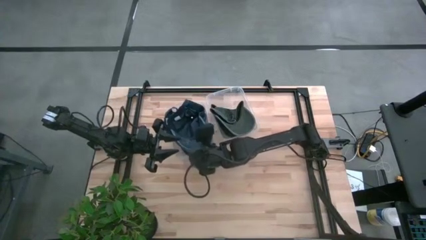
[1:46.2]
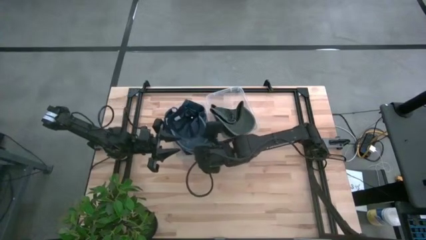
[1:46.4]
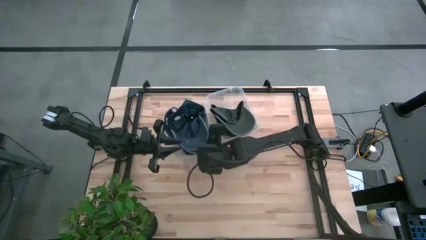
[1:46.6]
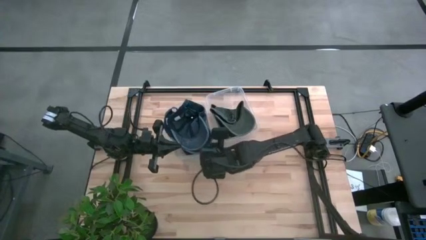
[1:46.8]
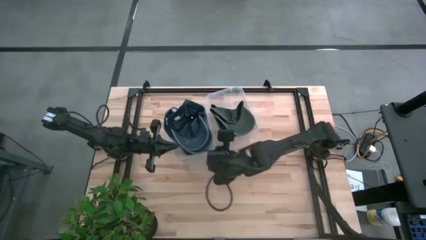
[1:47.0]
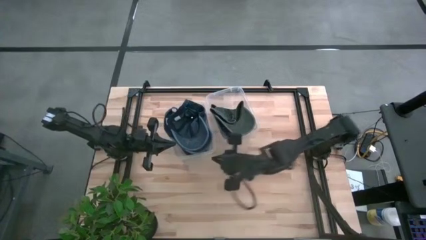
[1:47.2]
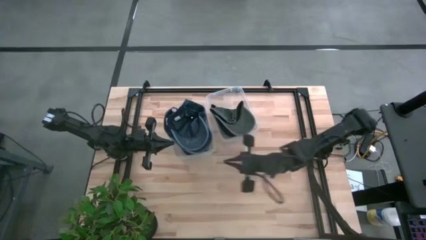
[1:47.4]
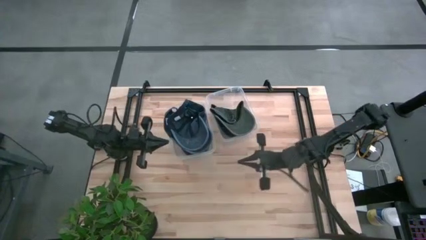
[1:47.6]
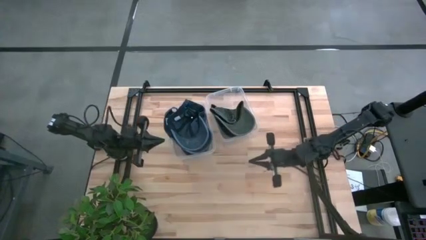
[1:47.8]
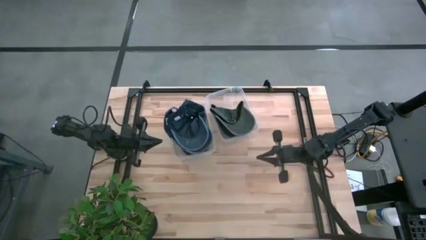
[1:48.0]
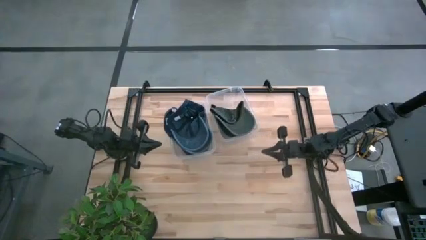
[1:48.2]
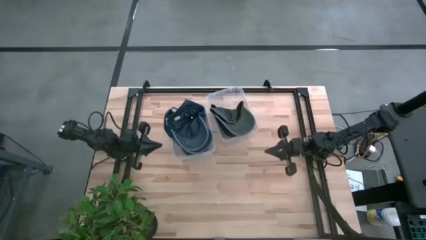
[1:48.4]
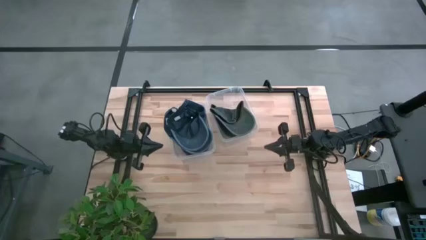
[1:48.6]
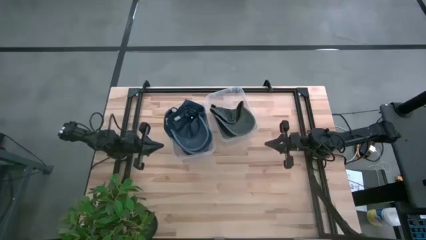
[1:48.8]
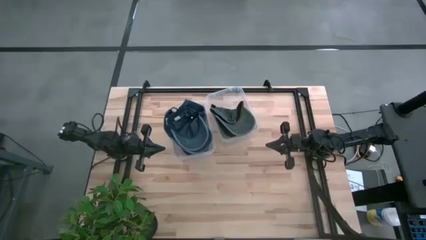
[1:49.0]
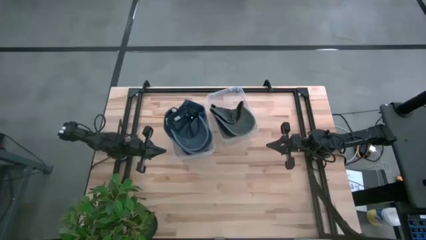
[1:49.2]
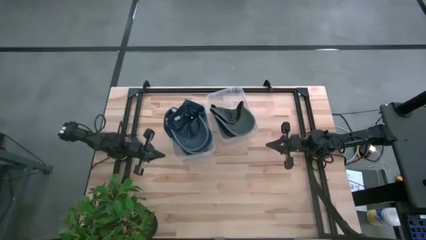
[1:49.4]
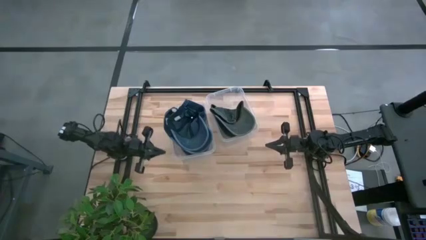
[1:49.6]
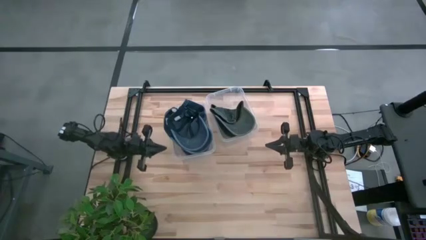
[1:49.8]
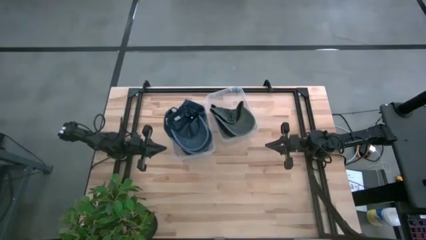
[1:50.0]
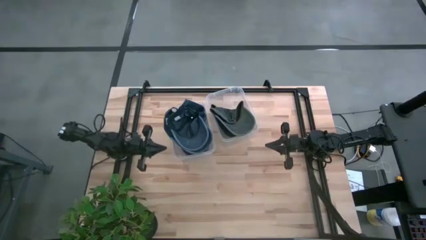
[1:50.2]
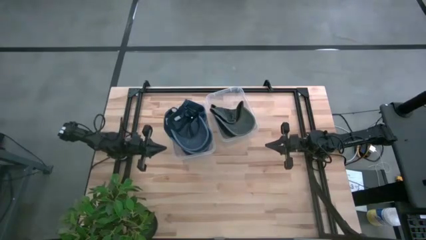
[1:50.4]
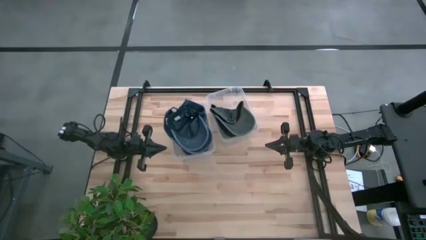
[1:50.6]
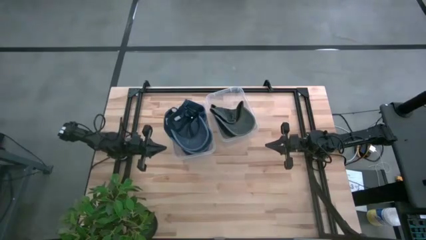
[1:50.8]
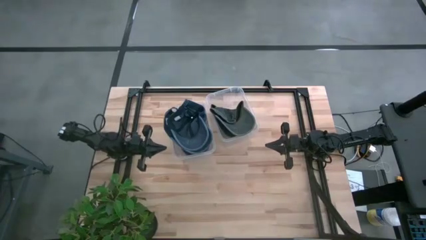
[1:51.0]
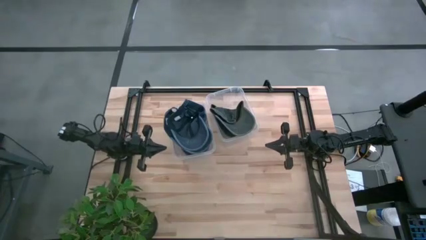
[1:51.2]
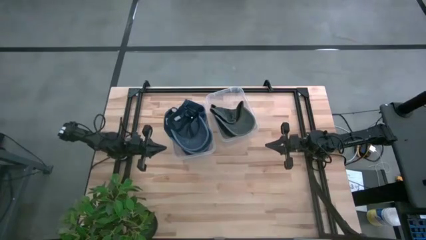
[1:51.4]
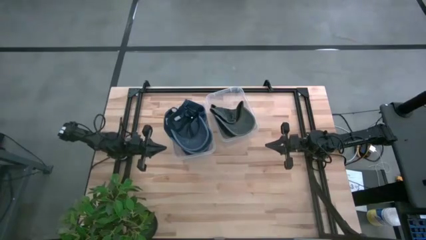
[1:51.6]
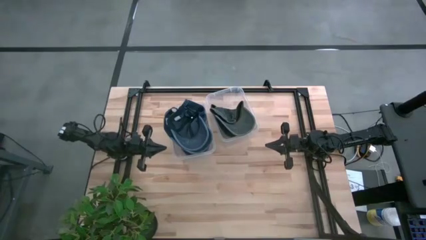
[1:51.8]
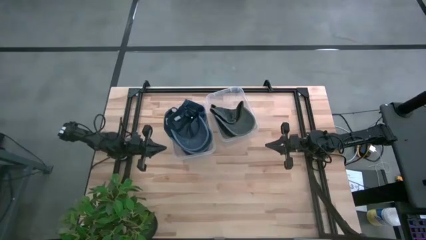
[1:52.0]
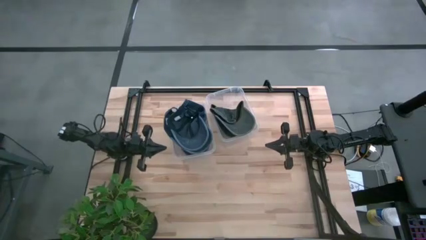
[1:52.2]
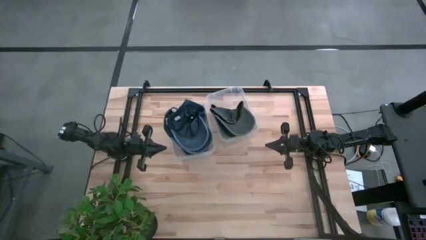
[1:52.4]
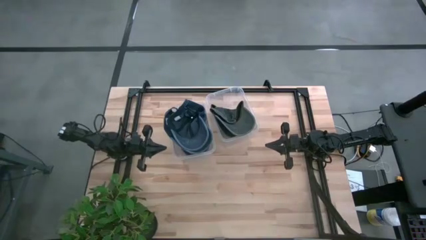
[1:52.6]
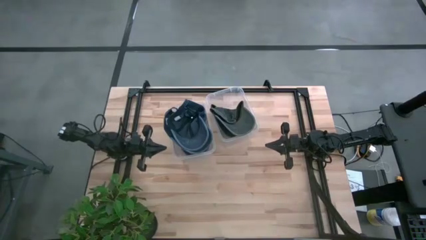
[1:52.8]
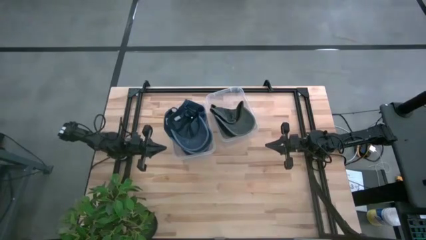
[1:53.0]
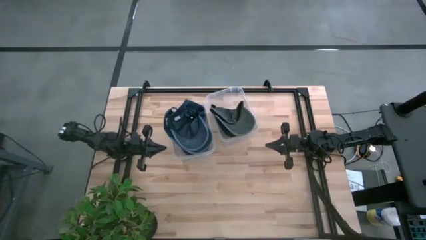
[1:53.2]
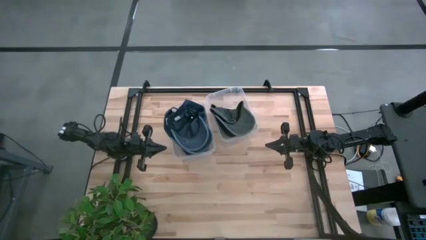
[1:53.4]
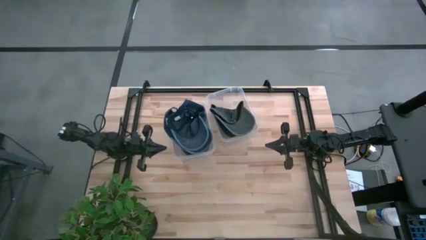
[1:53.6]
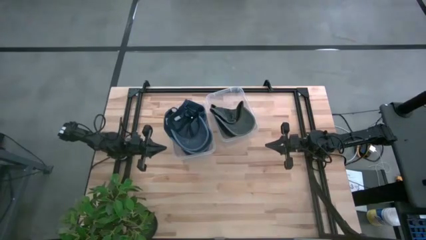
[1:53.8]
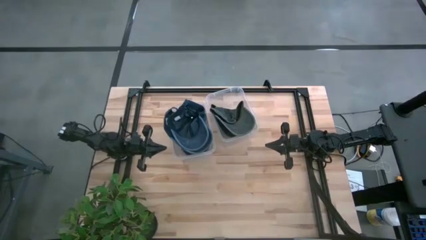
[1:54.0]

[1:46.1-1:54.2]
Task: Pick & Place hat
Return to Home Position

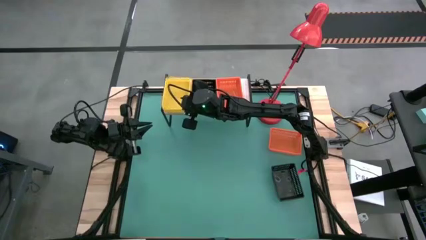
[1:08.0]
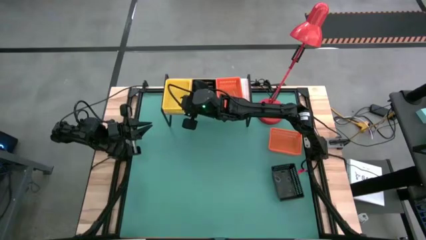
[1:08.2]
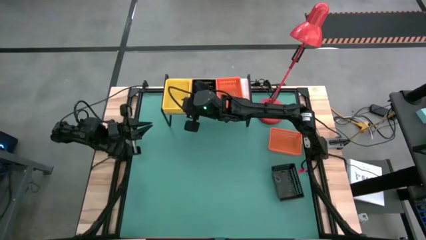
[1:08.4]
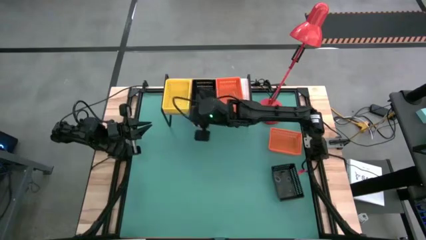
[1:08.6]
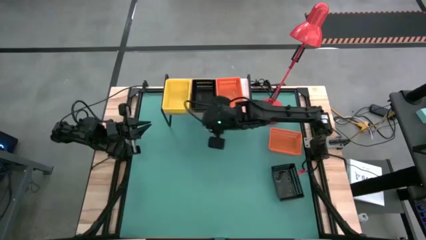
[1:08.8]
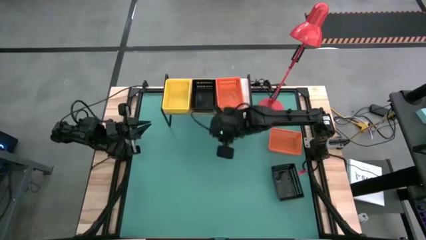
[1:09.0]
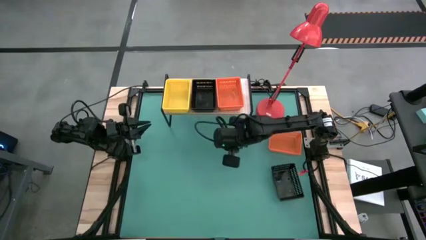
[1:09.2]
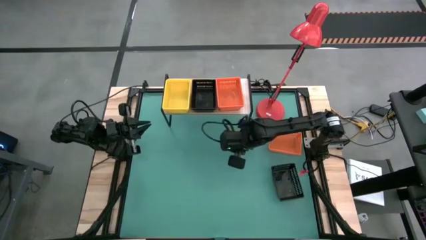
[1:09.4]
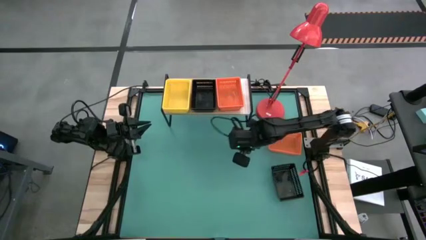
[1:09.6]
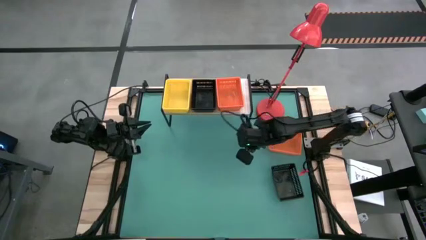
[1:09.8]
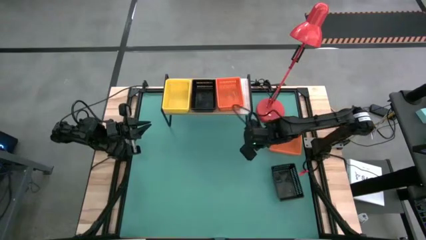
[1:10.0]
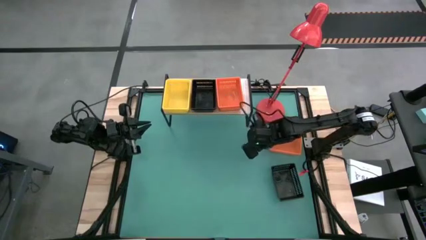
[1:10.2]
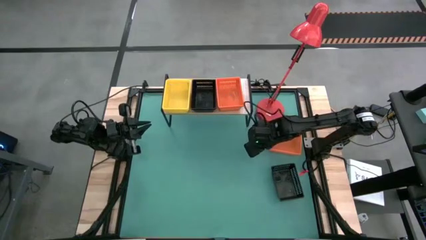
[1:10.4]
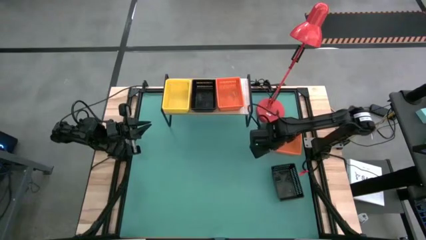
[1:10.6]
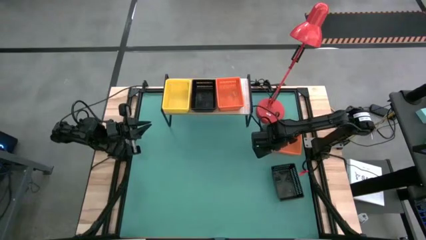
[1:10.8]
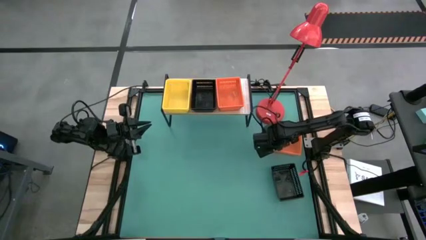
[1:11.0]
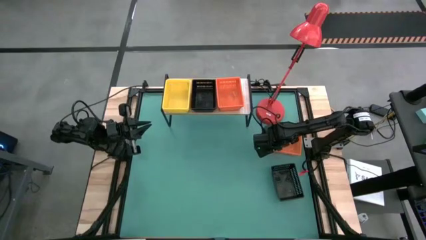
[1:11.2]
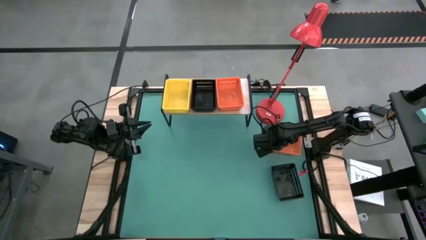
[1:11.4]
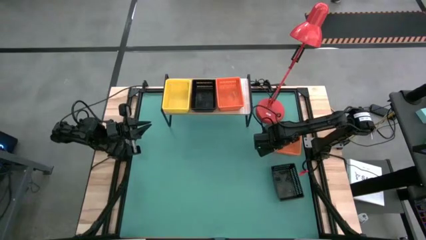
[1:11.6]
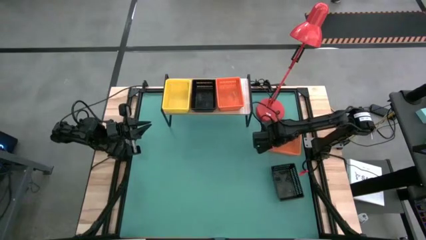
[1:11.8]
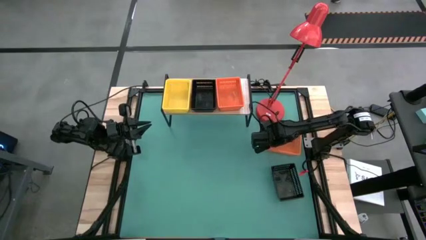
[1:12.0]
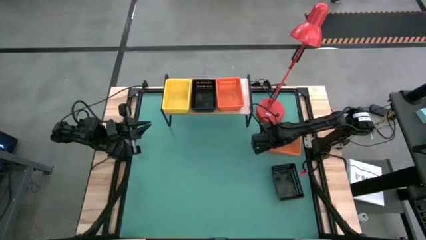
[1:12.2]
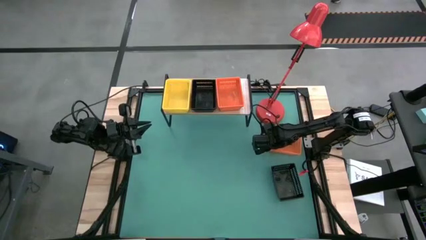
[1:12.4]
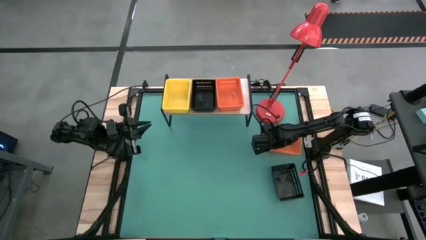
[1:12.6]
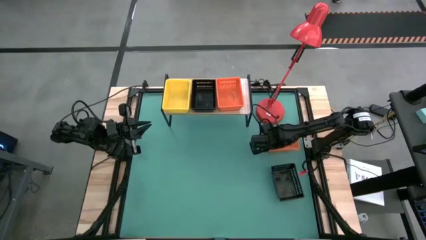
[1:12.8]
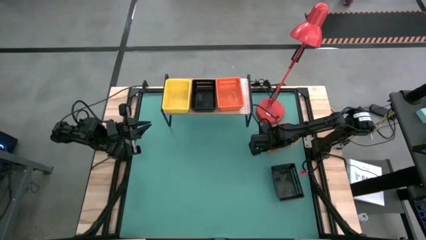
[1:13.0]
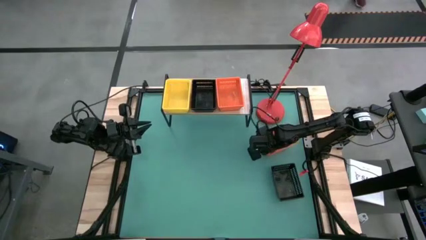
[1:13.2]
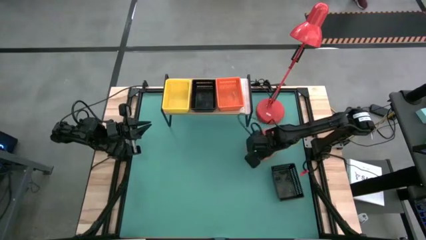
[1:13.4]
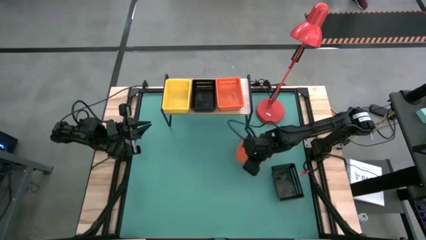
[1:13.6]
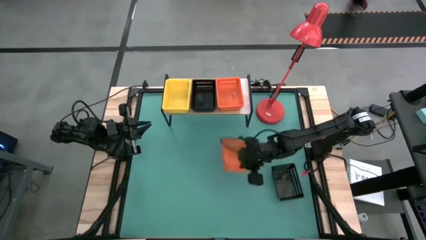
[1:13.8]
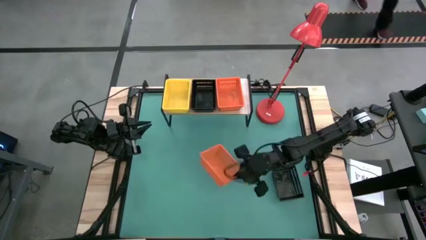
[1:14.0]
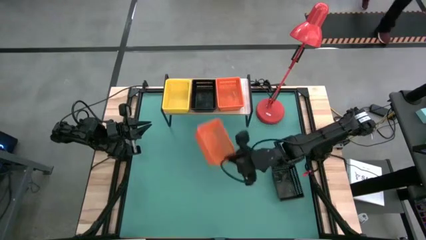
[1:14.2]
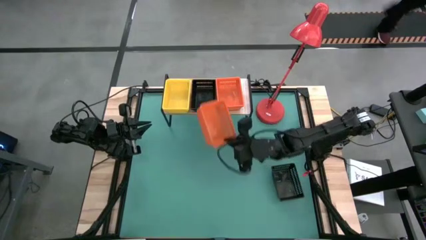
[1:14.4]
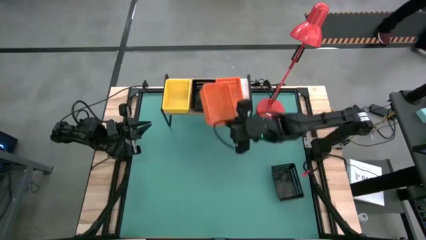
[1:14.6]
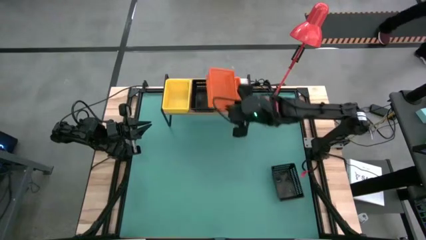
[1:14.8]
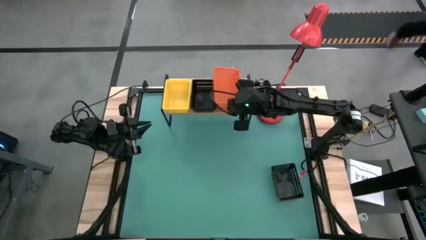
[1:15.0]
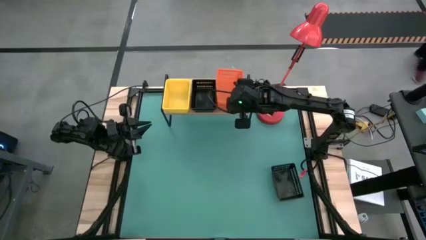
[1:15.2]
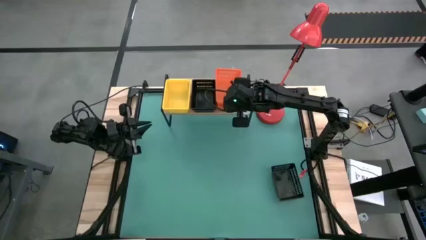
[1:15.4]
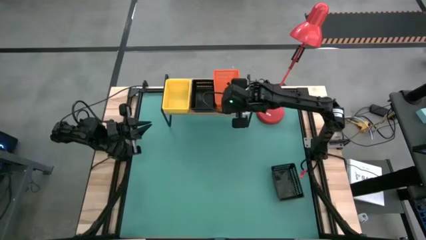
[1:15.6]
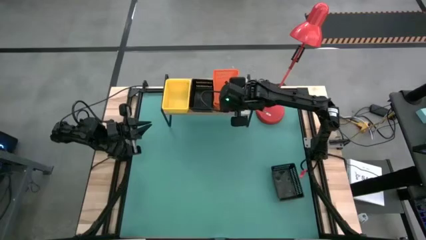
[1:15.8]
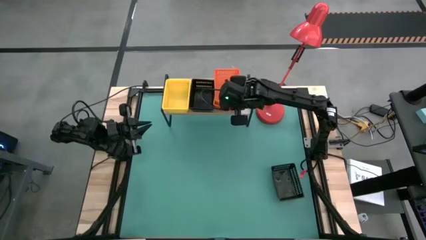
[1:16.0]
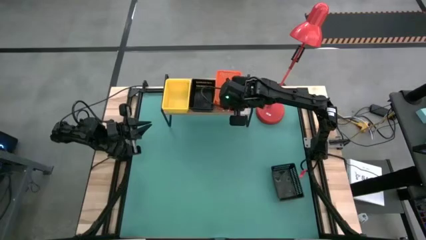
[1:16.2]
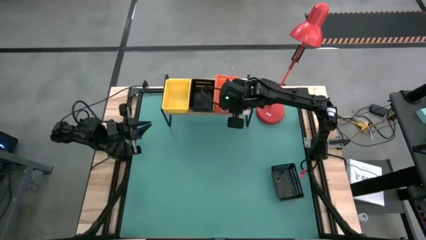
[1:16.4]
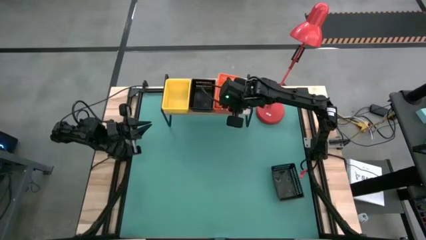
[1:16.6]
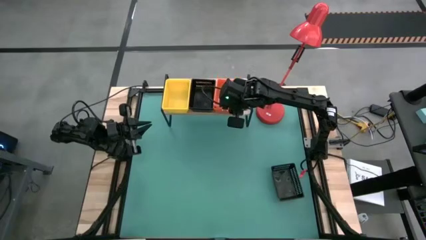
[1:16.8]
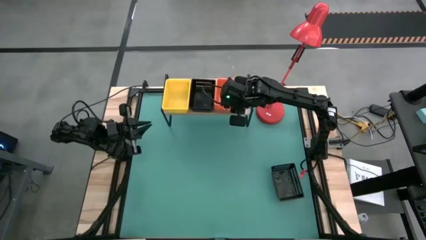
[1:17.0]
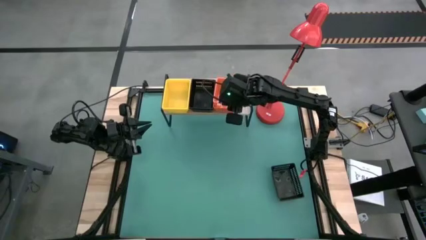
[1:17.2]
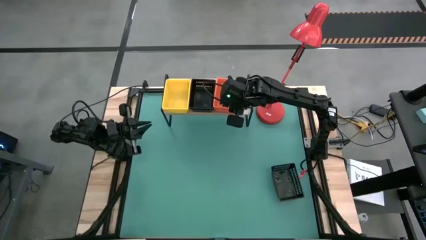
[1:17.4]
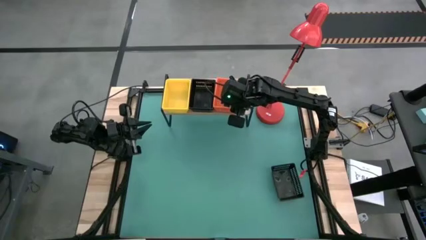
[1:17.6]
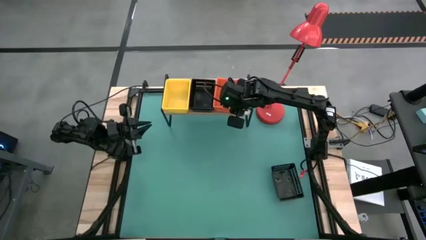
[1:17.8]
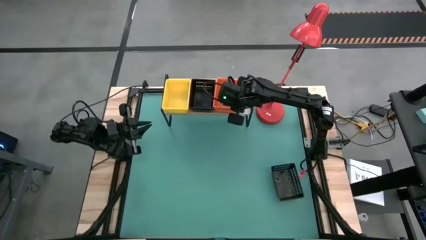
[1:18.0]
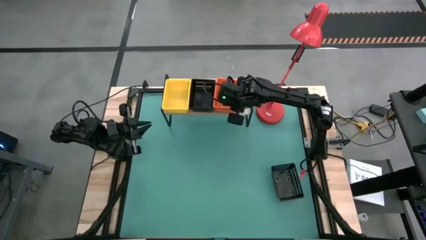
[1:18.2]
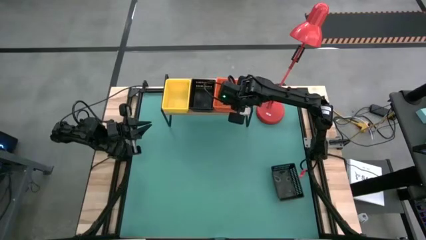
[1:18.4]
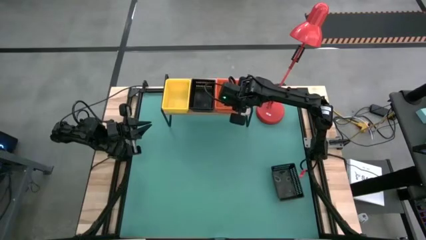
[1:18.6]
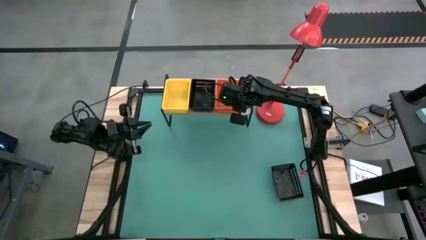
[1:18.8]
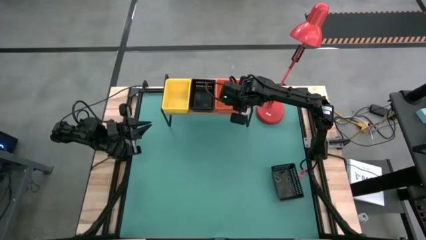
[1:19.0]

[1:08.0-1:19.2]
Task: Stack baskets on shelf by color
Stack the orange bin on top of the orange bin on the shelf
